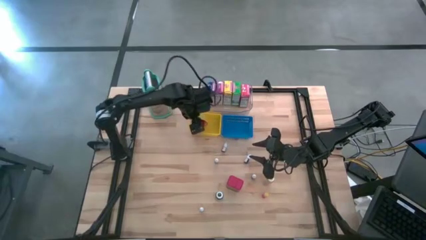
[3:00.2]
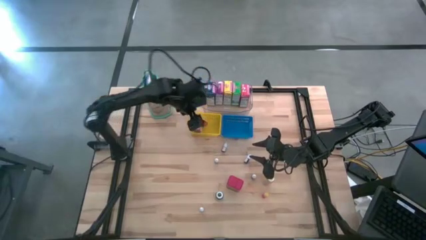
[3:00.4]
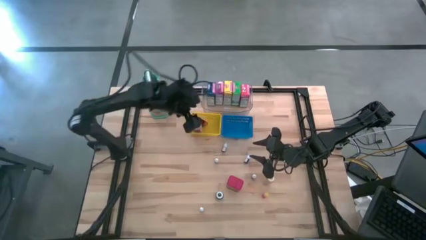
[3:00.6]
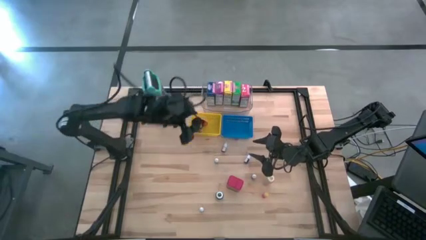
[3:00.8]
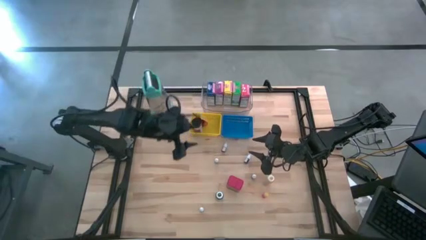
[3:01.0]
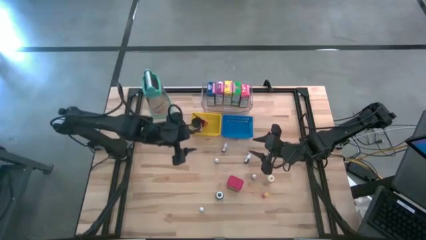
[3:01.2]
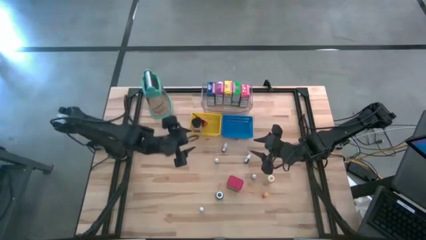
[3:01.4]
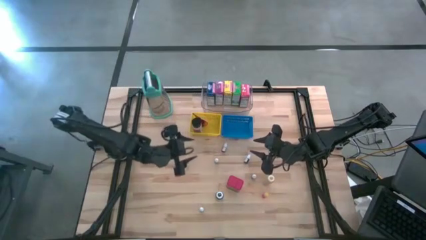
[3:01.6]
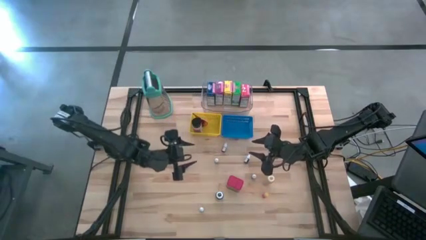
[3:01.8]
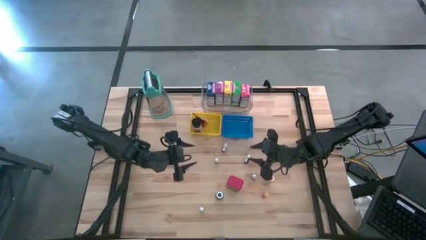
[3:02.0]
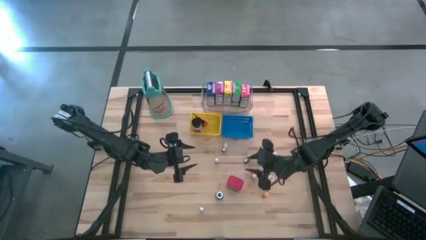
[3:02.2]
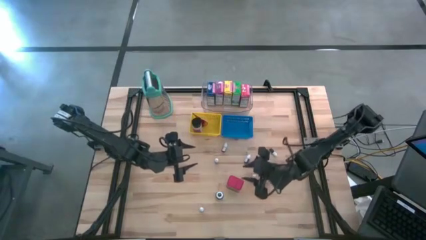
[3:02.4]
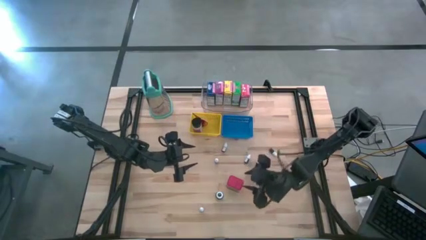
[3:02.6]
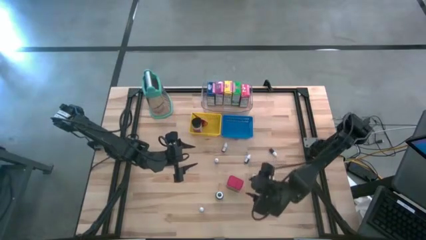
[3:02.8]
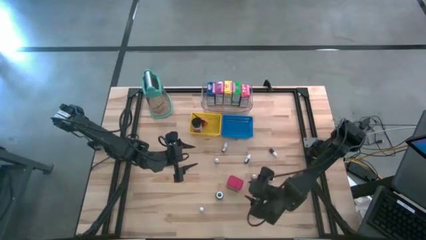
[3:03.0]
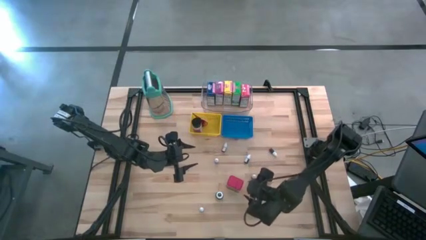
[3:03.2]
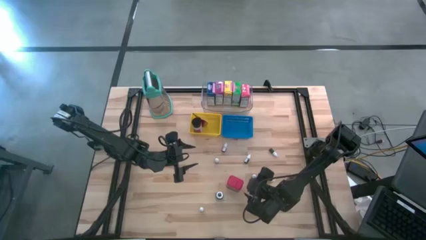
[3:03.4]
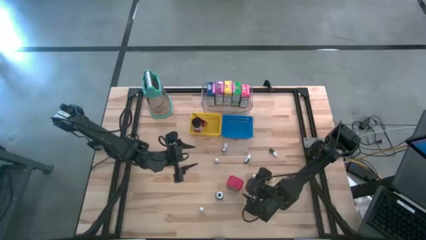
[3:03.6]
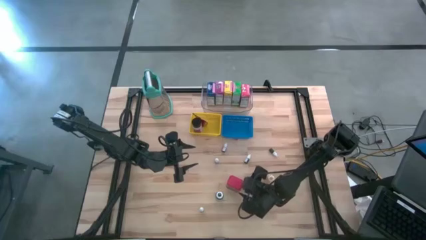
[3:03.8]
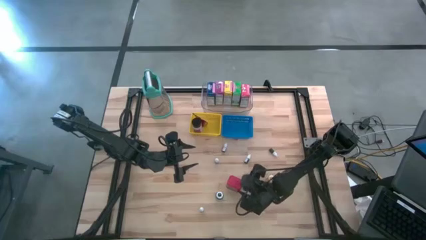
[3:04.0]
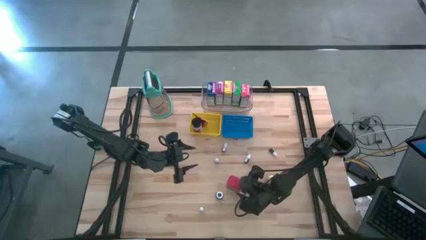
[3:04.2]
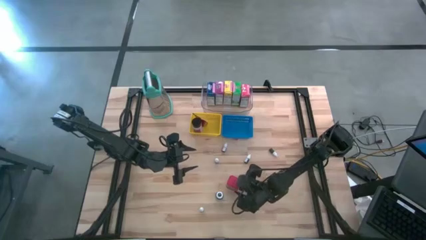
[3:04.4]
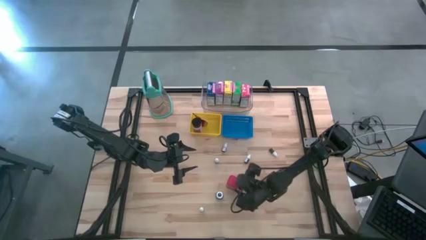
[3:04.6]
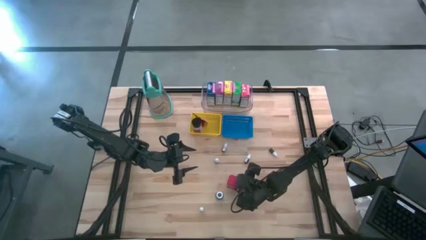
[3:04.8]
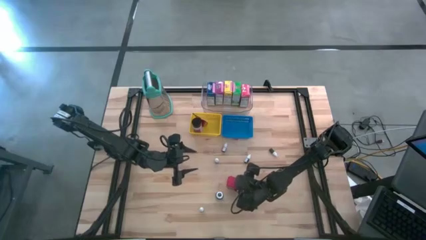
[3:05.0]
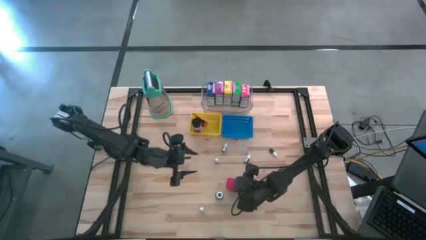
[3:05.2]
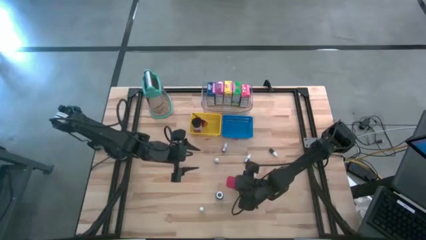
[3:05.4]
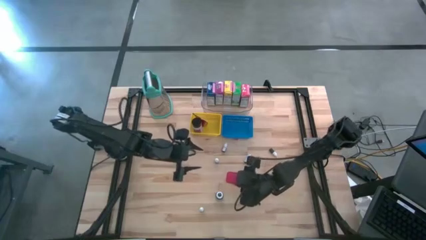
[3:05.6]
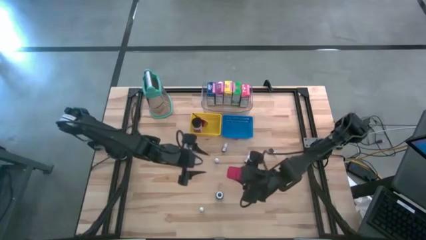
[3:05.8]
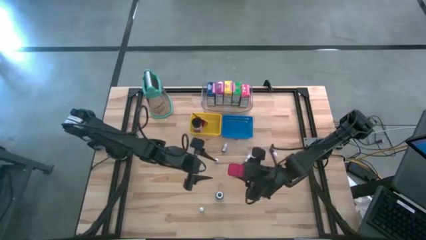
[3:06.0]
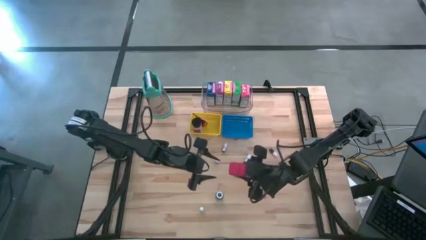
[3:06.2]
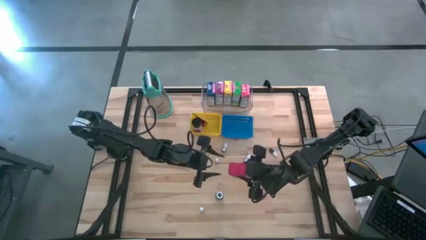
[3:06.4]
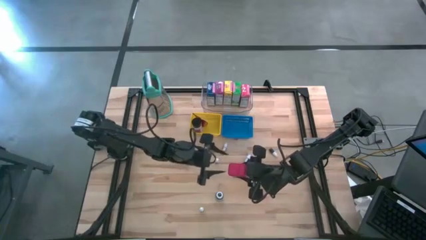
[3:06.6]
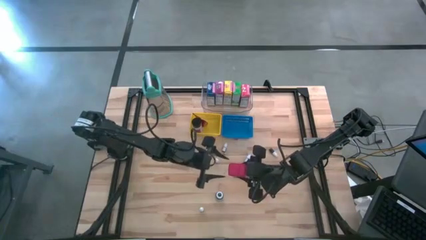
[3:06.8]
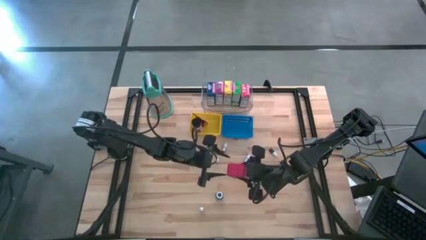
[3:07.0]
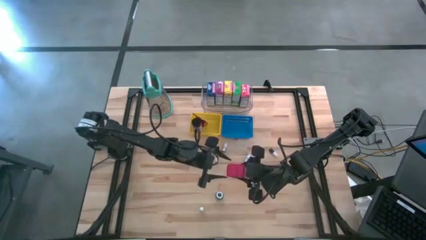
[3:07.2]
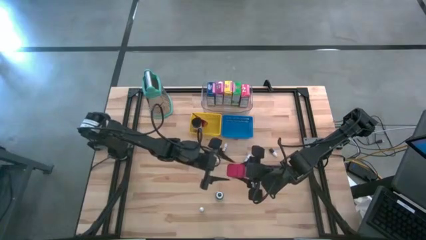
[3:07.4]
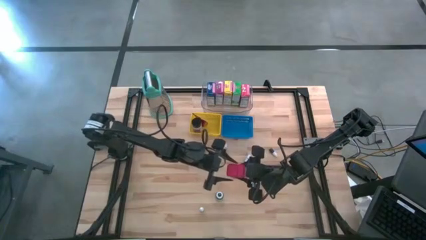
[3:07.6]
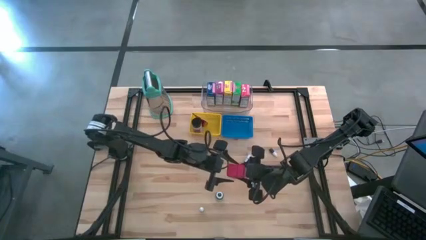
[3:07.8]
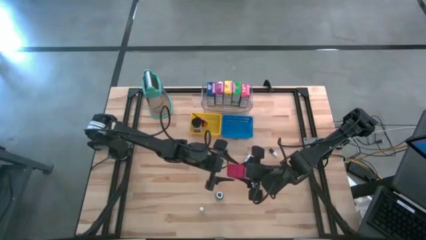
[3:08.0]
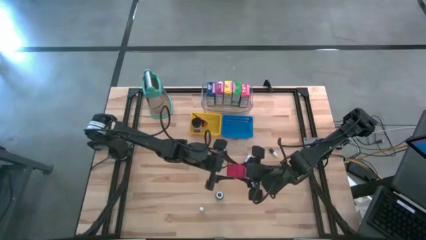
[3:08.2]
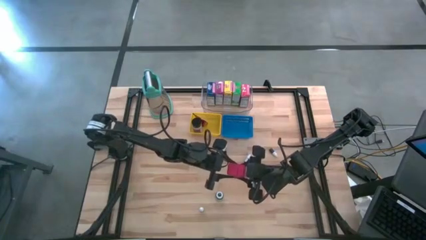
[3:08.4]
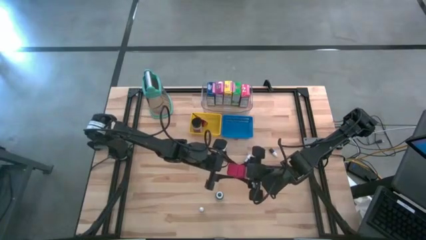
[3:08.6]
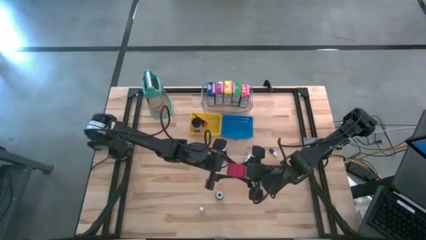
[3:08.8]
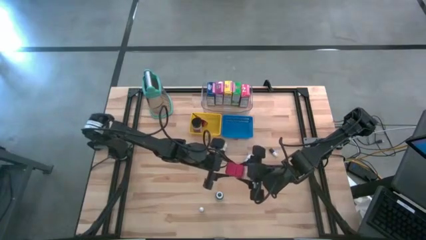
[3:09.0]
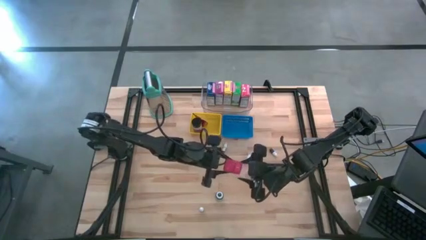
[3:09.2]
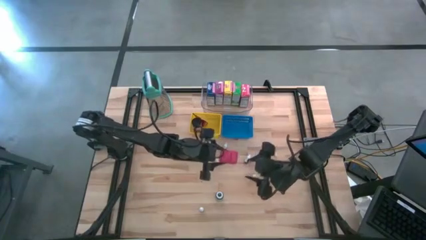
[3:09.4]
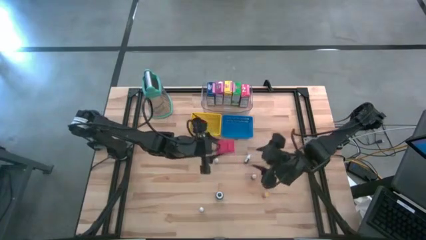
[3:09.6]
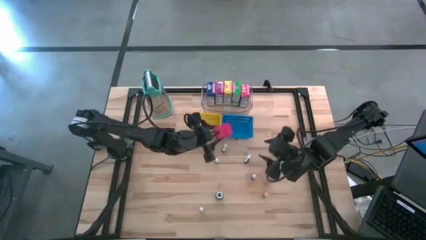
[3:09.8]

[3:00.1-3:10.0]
Task: Pick & Place Kitchen Items
Put the red seasoning can into the yellow bin

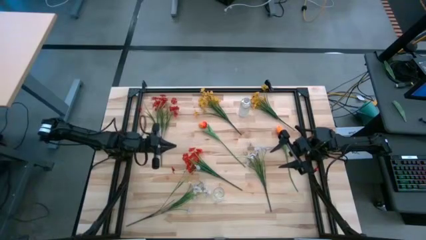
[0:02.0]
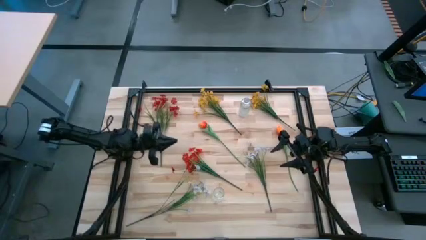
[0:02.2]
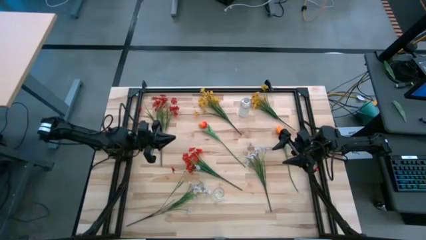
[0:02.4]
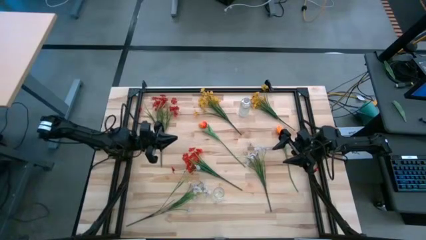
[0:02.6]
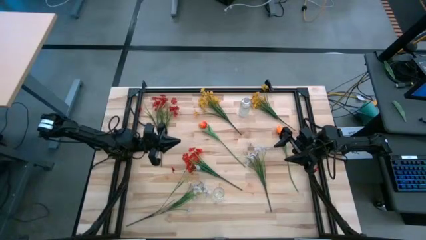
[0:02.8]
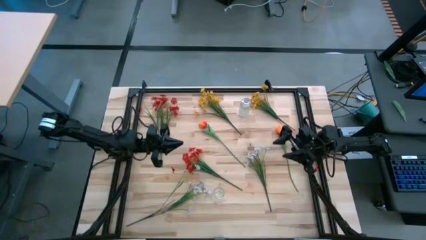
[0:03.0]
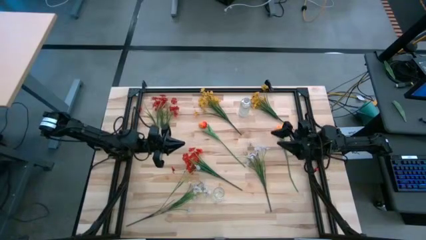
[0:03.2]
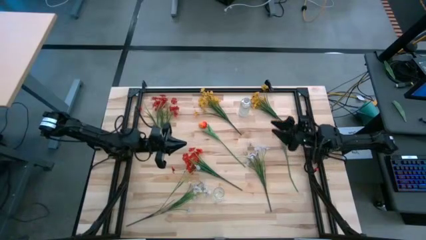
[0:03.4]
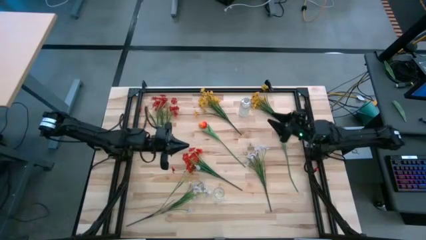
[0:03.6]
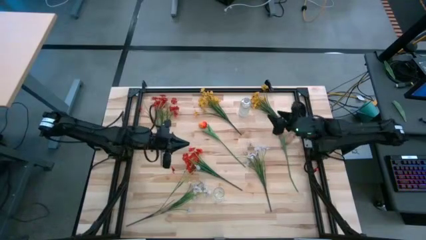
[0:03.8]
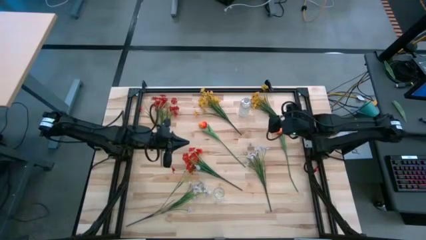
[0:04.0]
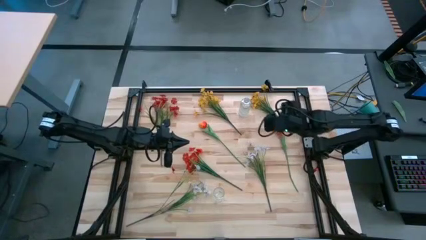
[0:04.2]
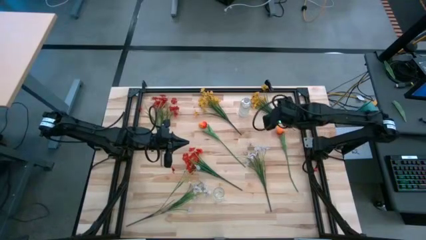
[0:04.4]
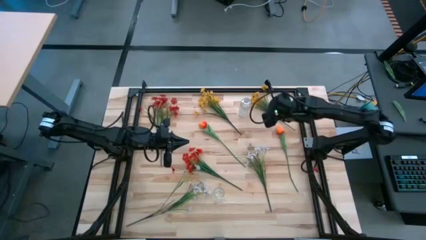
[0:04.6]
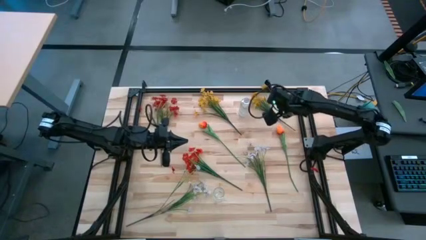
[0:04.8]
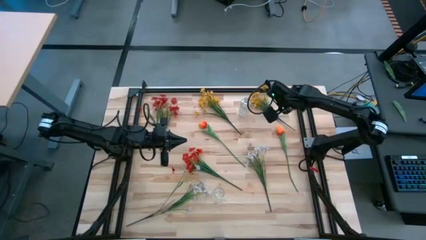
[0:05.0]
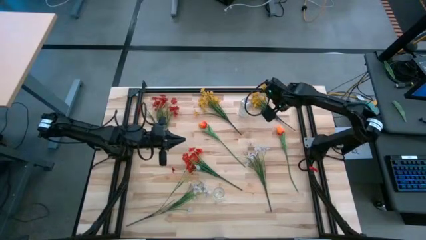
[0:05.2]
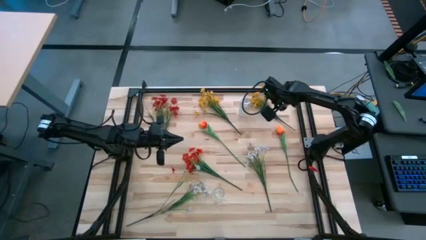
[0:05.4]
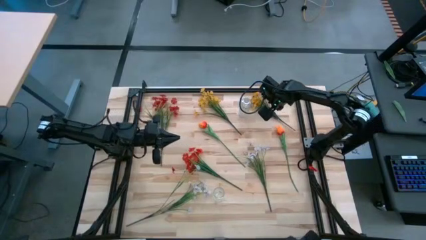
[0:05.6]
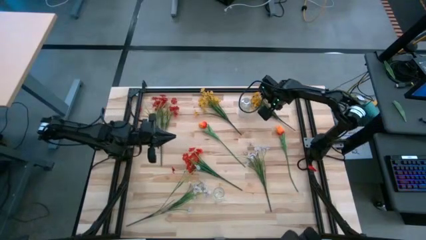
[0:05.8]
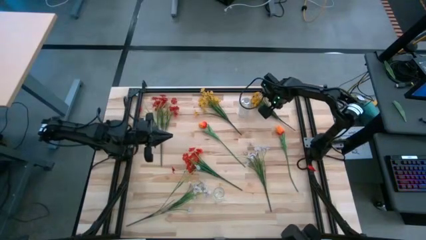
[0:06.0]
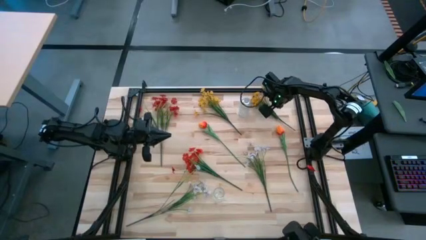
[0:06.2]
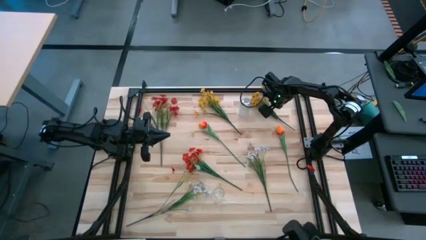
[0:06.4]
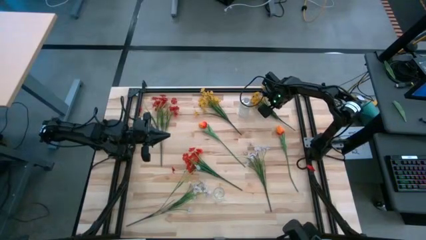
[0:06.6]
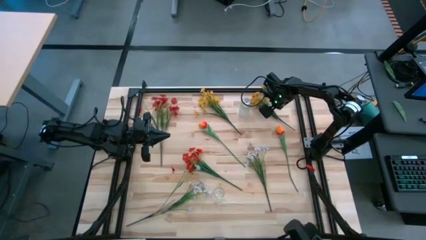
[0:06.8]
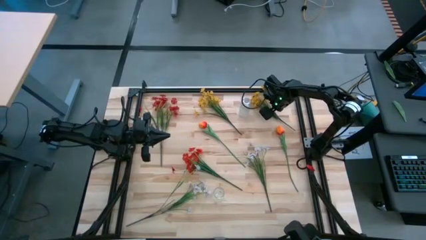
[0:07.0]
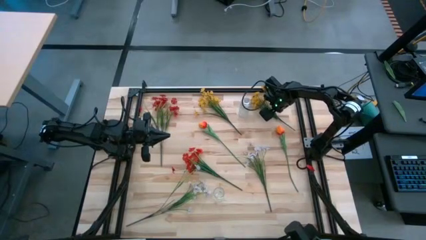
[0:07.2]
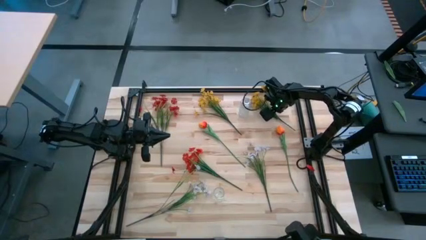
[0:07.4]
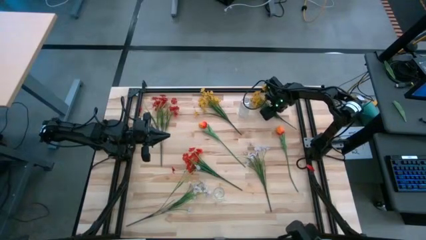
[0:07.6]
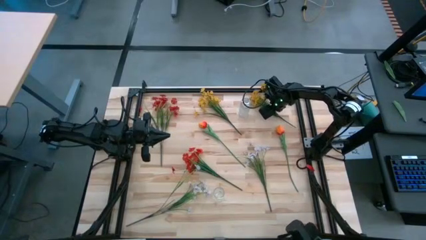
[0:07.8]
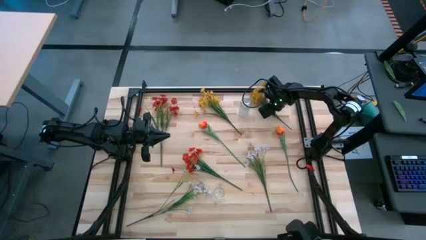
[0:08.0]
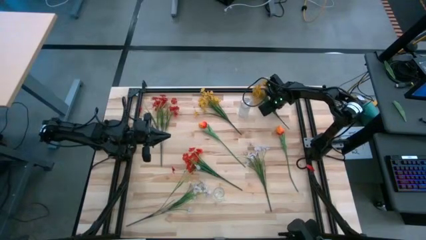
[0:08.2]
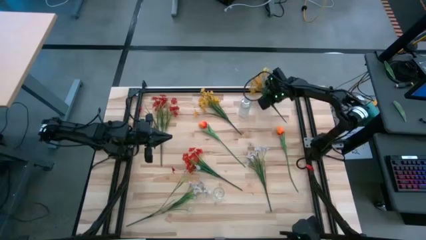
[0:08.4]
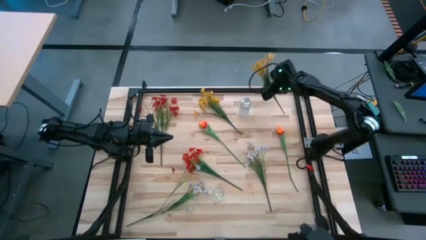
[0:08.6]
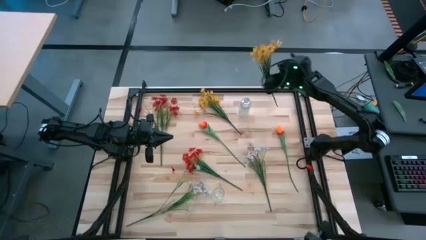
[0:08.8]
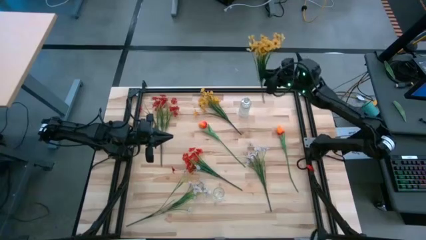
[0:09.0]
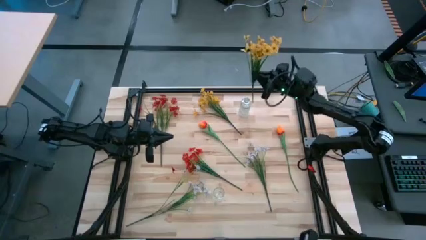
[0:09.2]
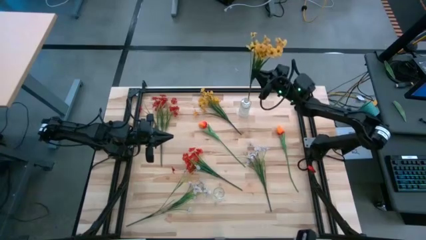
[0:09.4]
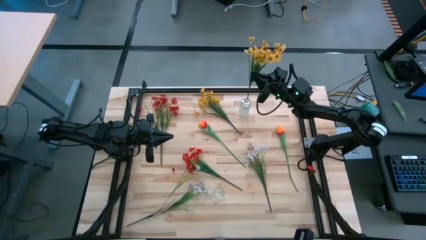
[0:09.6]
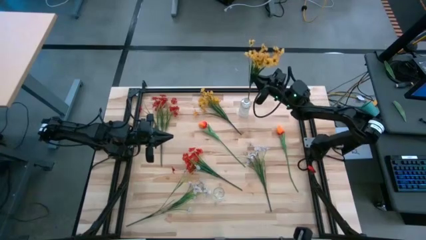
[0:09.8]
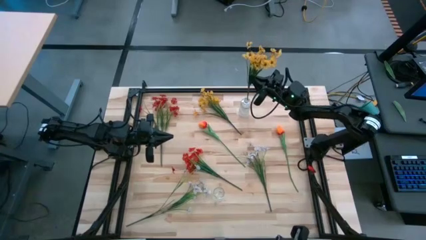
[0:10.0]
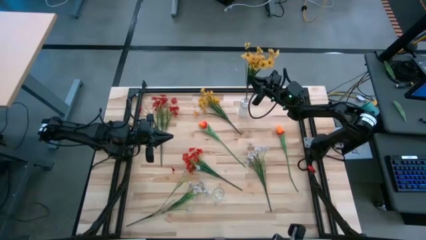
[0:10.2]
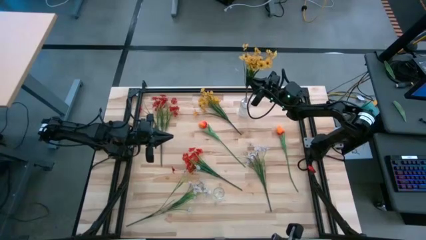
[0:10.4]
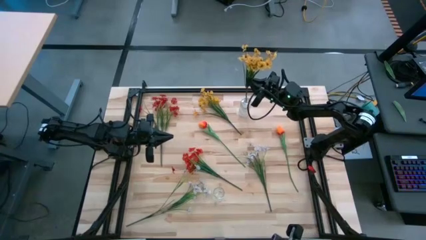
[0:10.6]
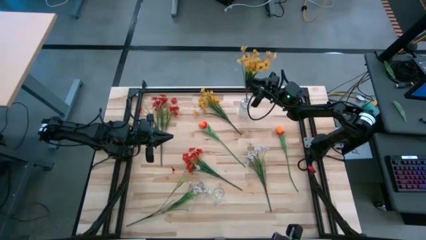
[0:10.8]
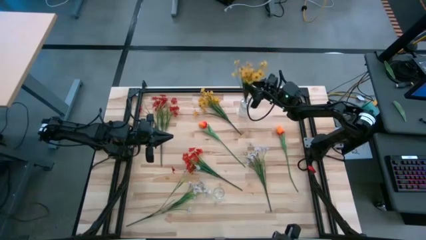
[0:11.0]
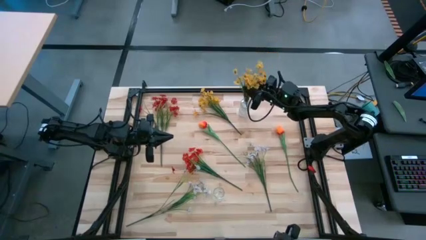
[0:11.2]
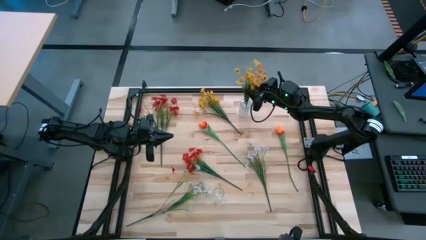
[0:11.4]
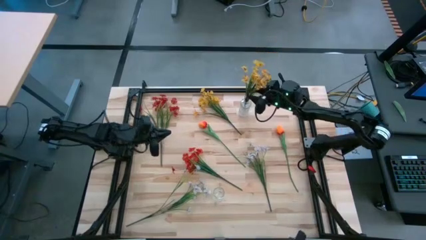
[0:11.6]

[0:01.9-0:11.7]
Task: Sort flowers into vase by color
Put the right yellow flowers into the top transparent vase
